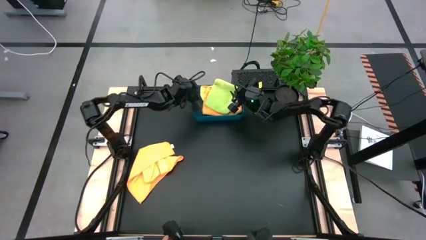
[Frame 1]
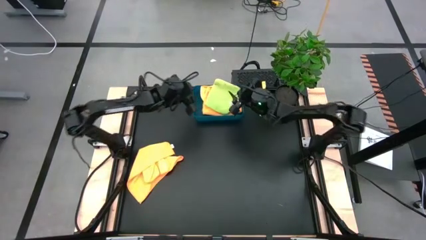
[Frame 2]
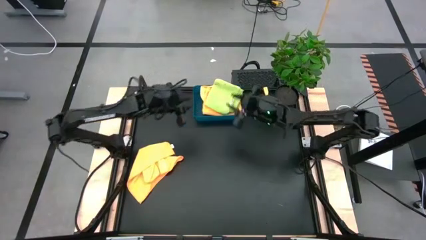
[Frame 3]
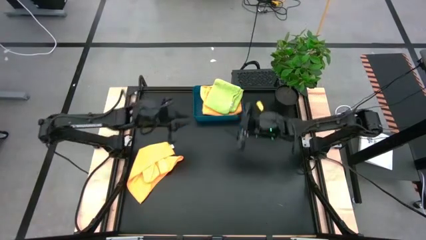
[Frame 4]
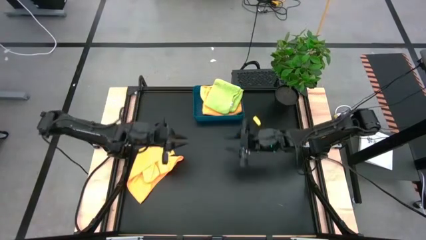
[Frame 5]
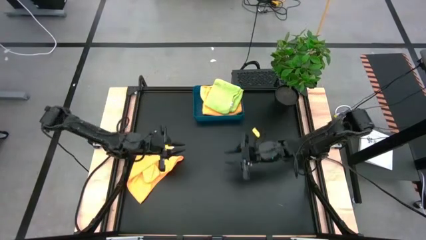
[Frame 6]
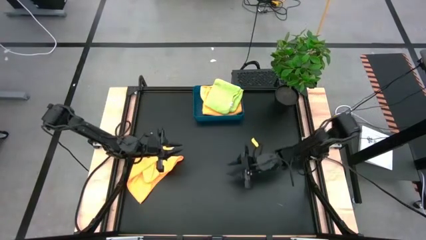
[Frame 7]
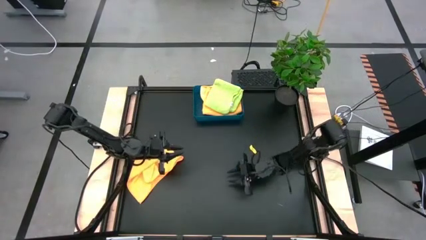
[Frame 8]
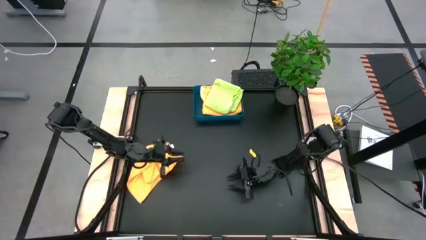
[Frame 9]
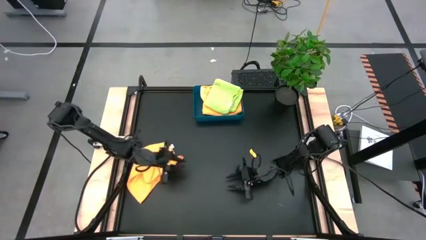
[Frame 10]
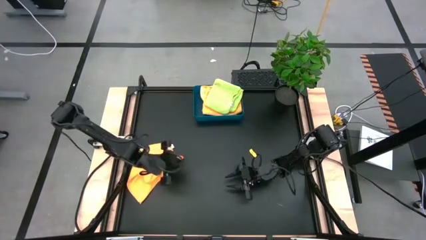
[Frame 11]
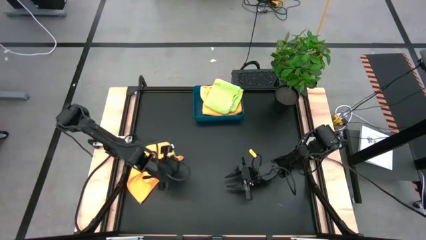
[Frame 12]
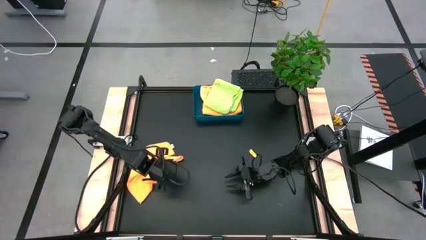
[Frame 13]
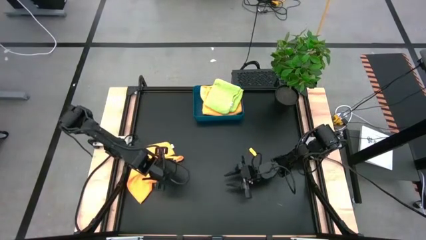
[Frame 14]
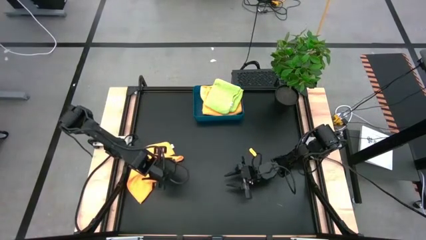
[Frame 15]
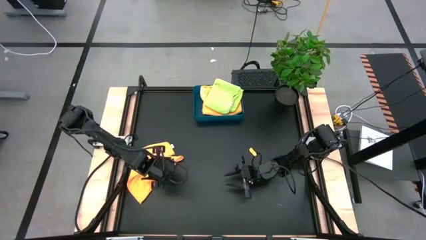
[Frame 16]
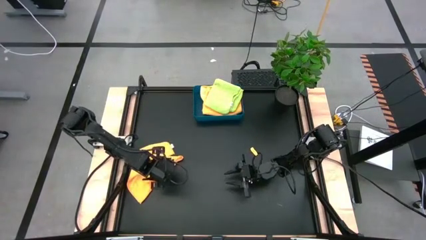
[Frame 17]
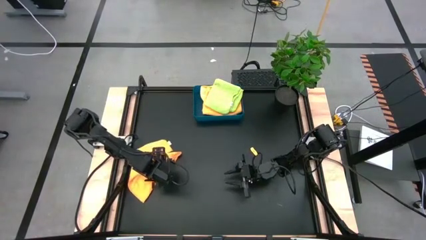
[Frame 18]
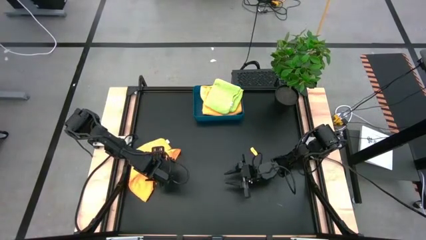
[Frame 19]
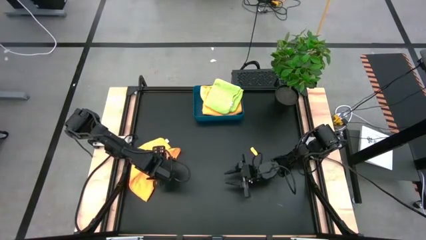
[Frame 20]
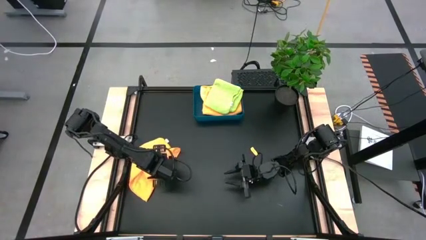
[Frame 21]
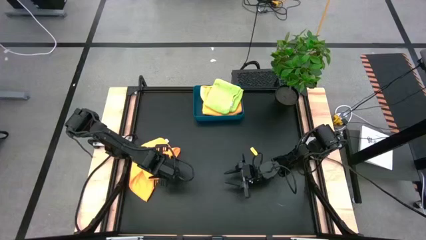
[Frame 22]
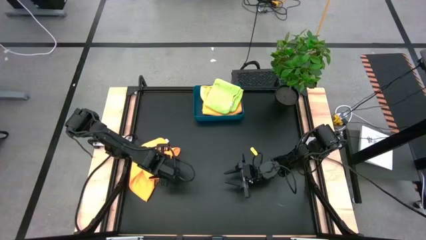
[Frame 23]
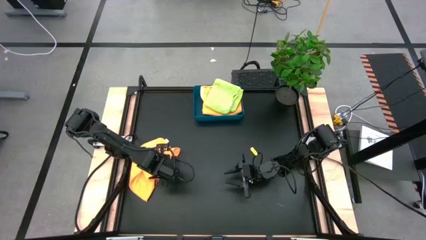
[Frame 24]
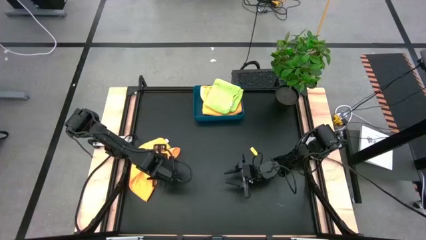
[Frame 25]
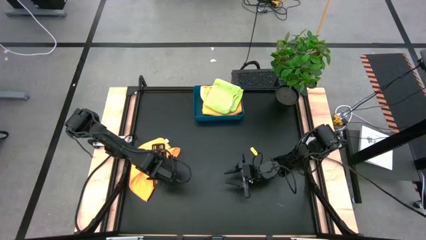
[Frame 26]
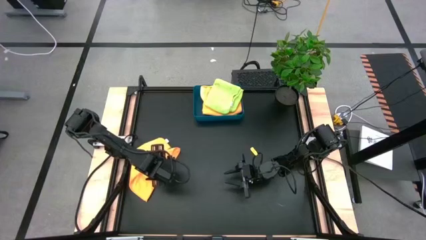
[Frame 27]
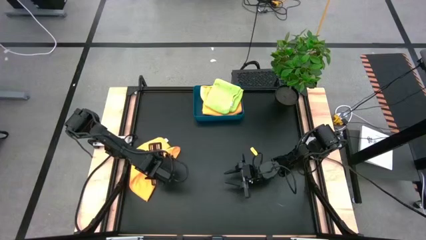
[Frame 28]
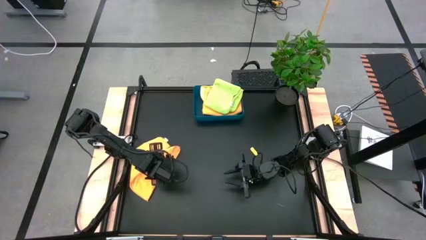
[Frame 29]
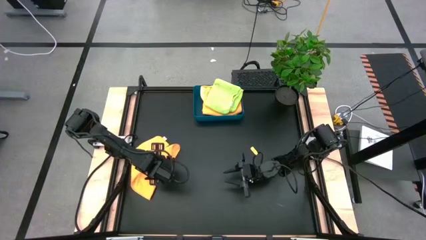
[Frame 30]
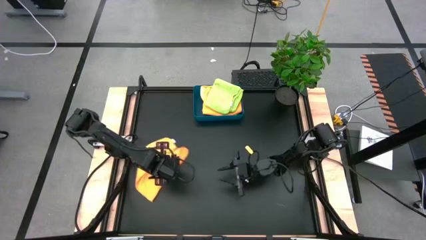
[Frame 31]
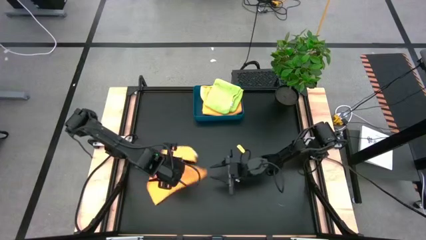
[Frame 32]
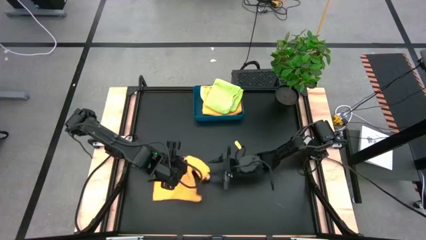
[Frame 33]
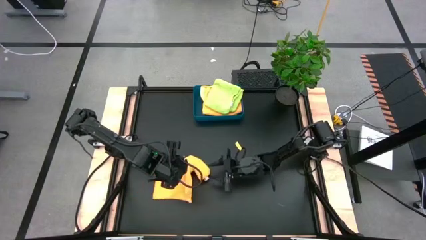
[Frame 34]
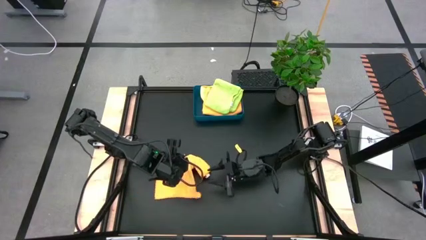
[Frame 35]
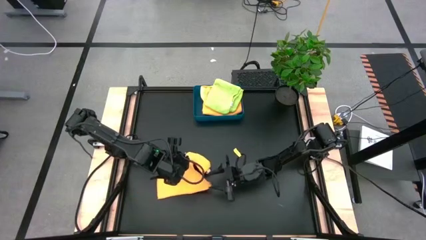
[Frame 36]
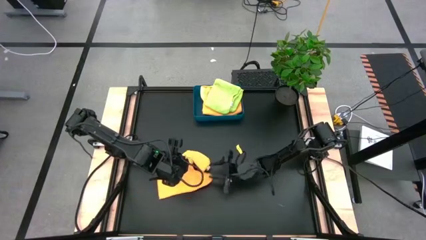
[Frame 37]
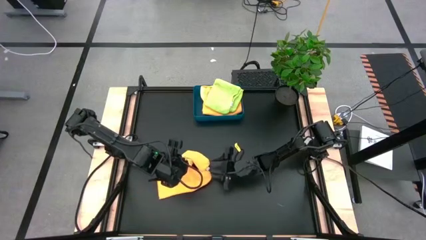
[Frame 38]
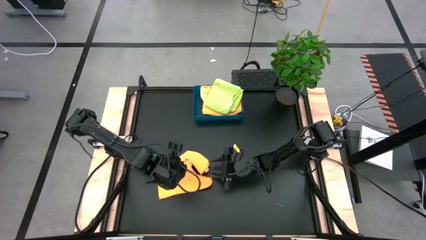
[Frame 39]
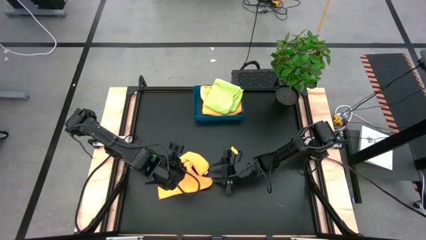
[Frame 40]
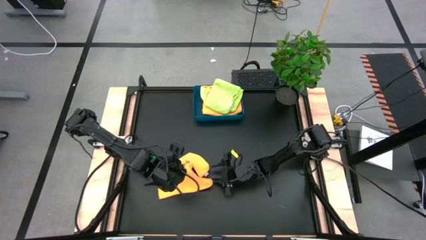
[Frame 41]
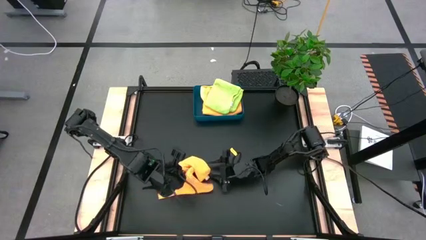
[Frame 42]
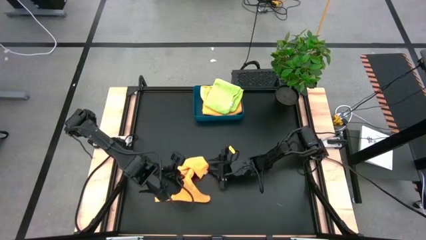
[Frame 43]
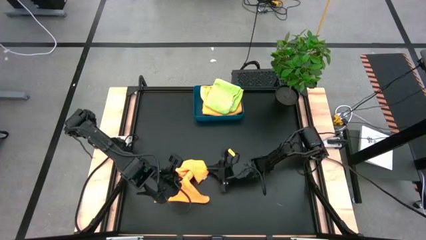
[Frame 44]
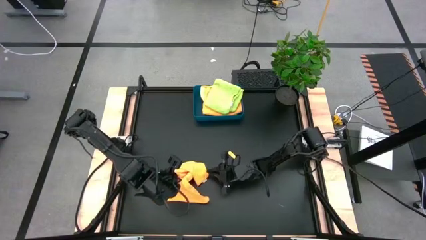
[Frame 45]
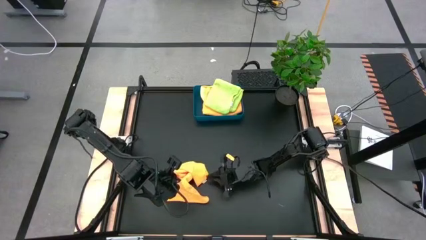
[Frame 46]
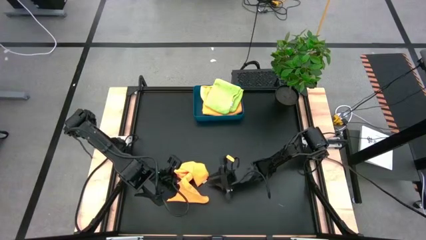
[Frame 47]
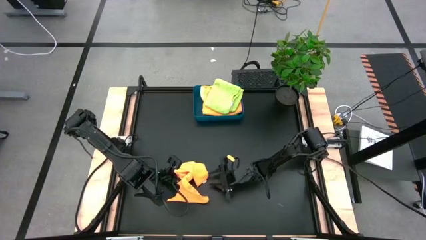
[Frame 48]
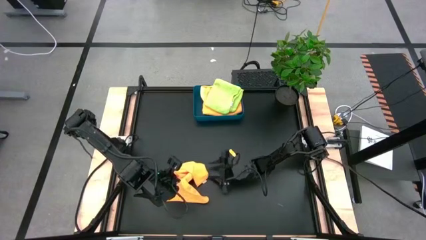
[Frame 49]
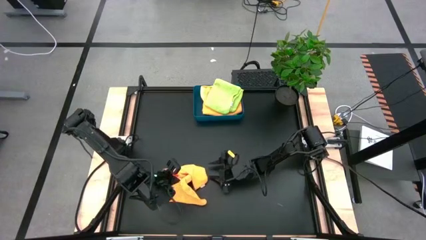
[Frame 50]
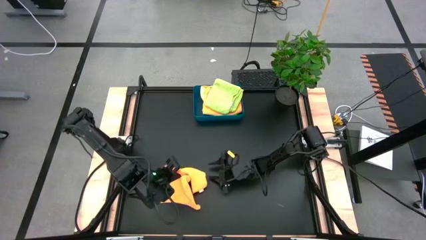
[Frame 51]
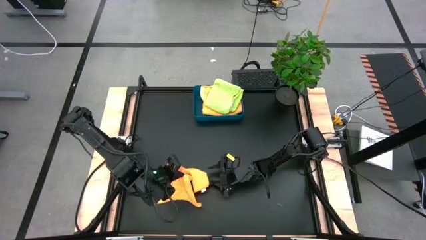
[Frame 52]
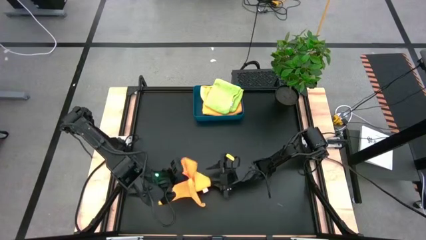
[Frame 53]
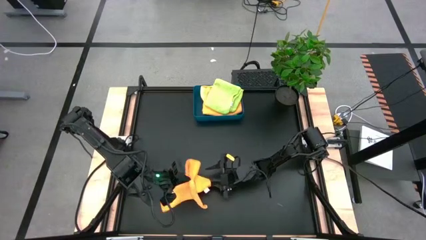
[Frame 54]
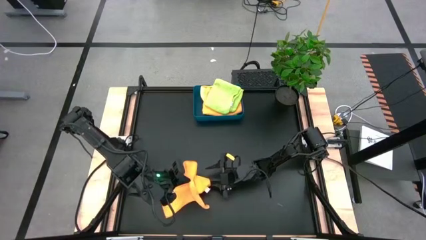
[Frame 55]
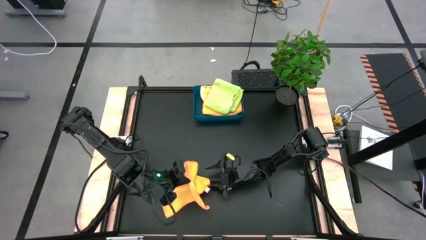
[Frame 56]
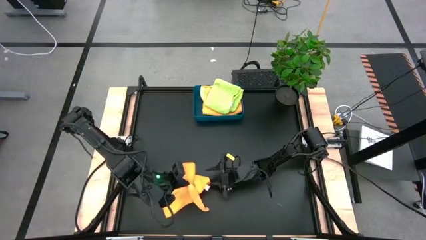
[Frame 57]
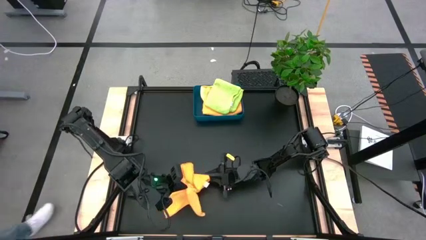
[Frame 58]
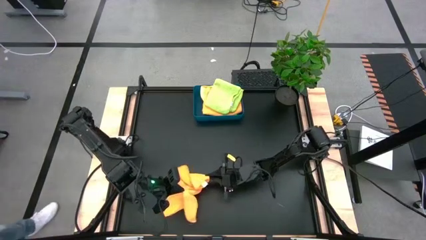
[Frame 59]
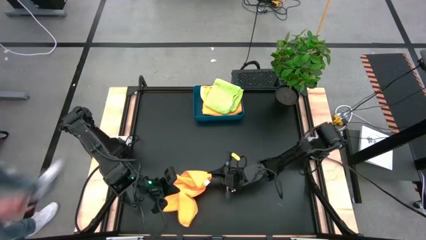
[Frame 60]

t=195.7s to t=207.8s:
Task: Fold microfiber towels
Fold the orange microfiber cloth
